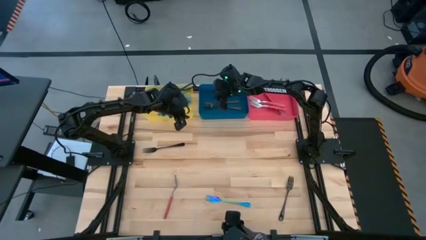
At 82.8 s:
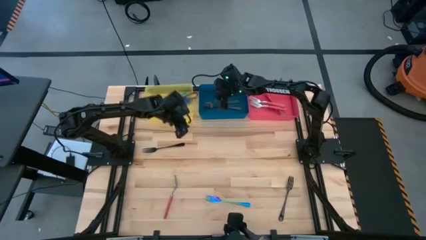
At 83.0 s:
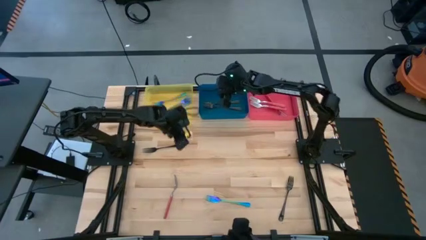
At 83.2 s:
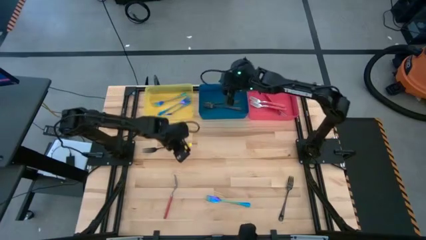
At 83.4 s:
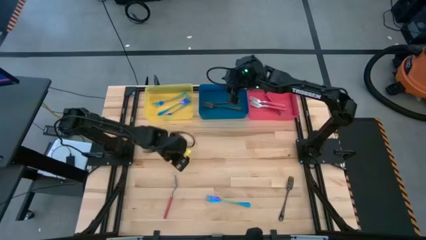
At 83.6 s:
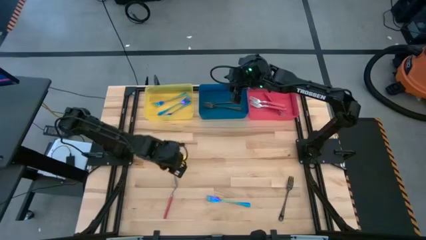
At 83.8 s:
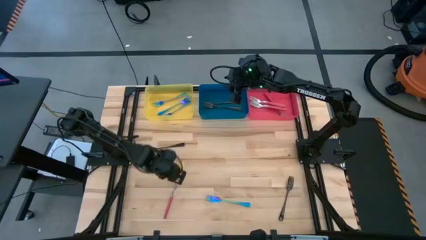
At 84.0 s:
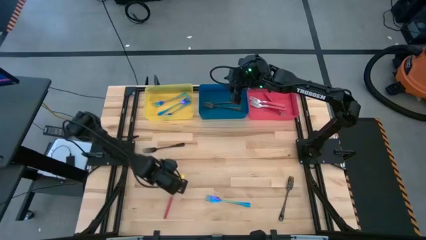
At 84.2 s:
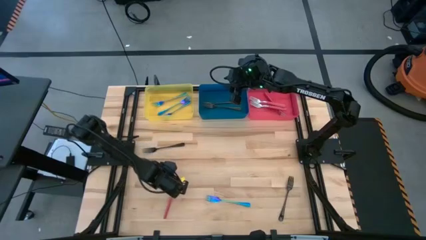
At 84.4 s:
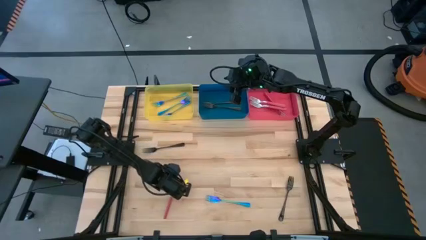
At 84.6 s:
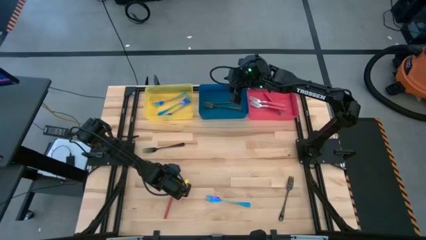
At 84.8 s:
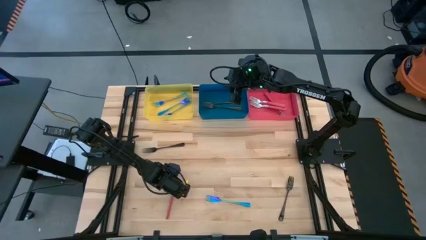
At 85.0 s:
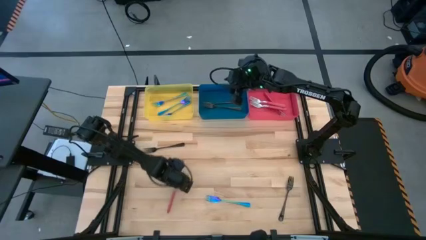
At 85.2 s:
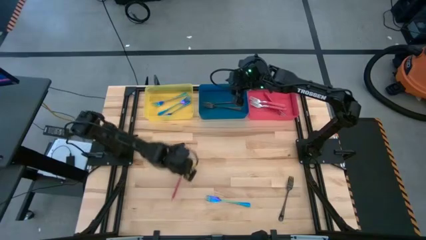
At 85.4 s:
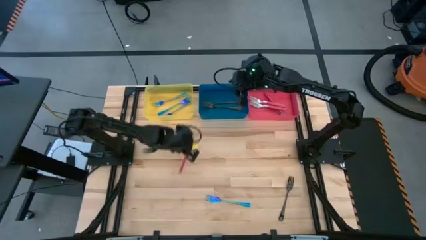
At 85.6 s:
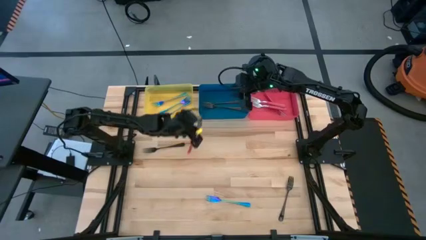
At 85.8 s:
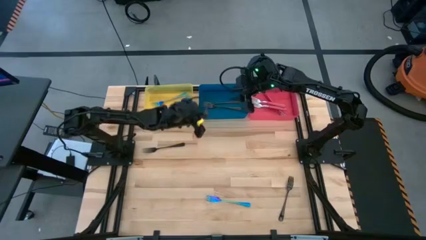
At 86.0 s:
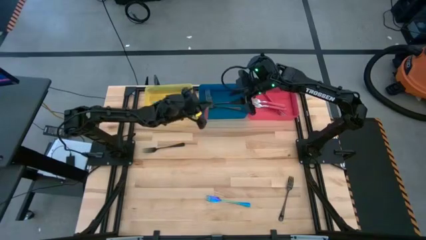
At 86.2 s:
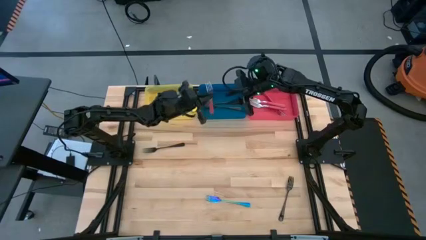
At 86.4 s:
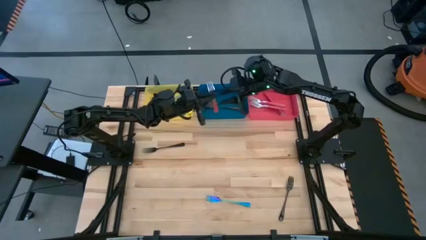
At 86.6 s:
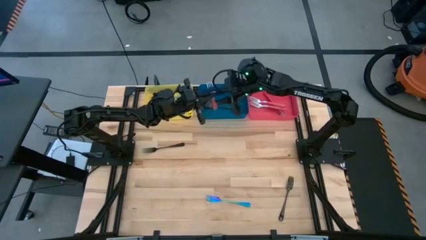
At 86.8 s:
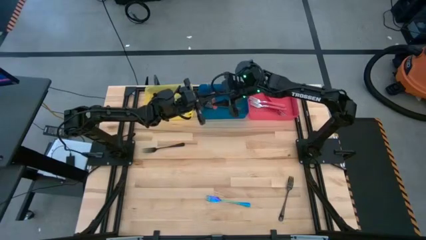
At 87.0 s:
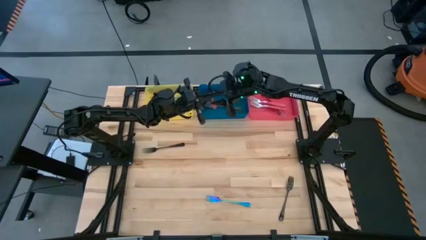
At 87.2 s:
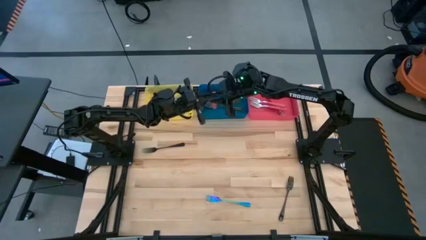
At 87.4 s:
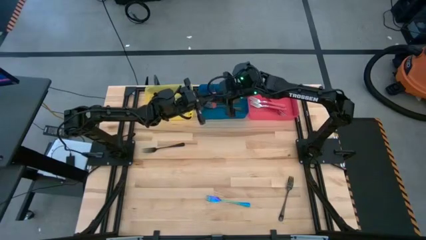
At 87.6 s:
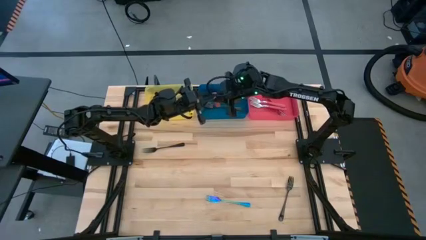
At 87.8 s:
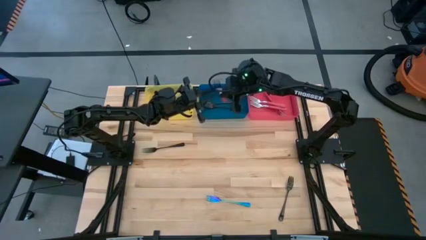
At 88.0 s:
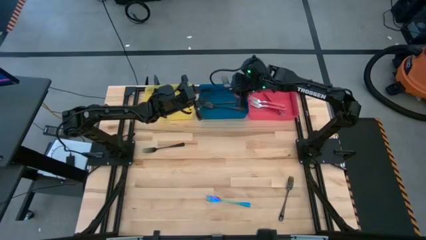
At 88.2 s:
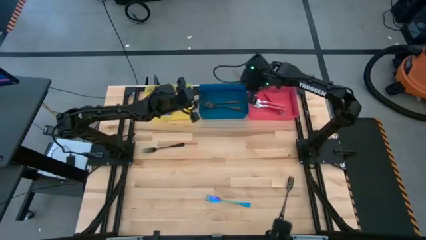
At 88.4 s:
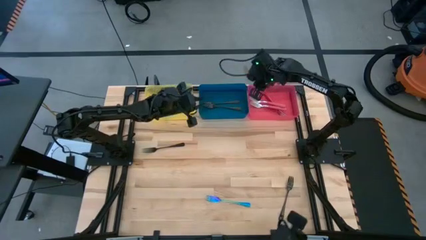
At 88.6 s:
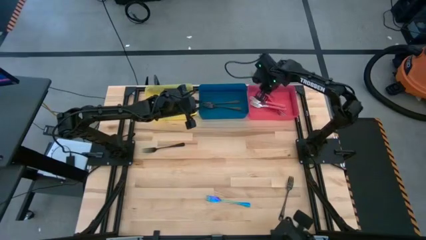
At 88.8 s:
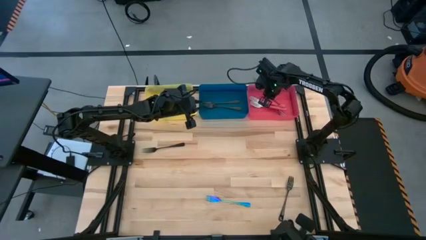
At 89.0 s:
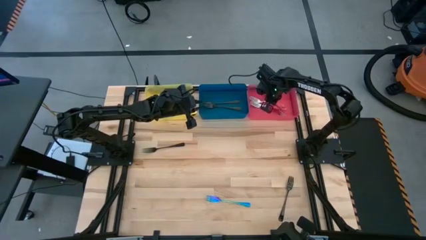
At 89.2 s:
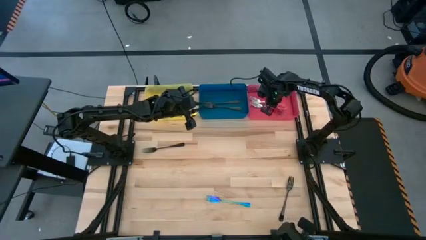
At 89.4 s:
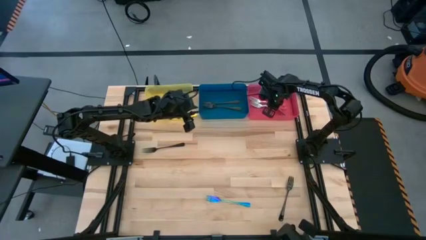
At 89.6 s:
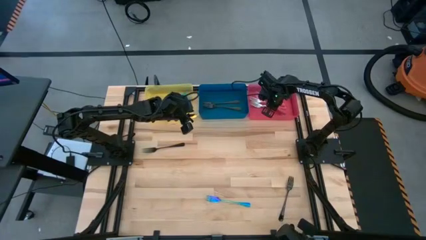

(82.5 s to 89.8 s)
Task: Sort silverware by color (type)
Put the pink fork into the pink bin

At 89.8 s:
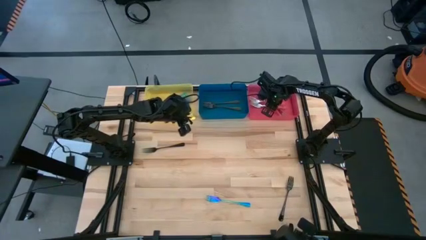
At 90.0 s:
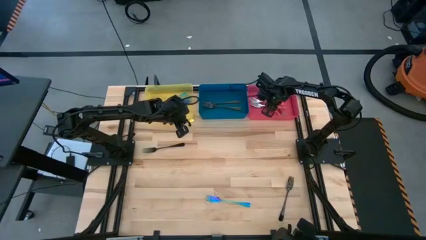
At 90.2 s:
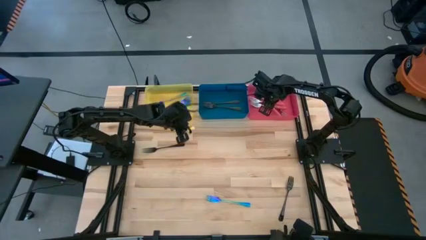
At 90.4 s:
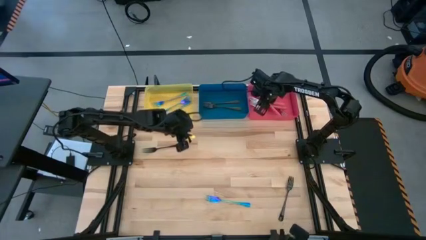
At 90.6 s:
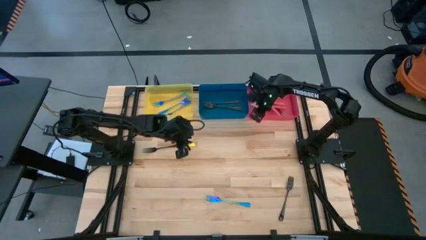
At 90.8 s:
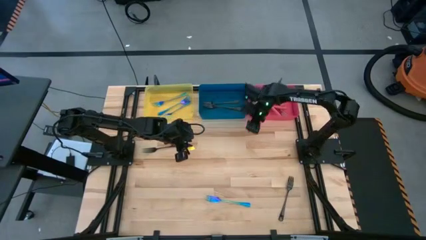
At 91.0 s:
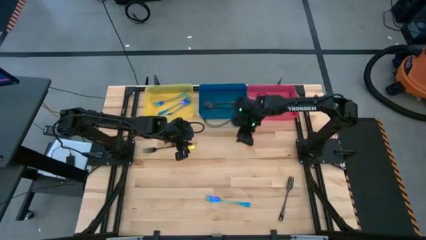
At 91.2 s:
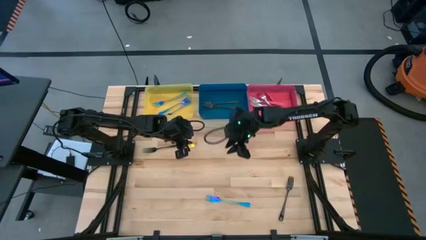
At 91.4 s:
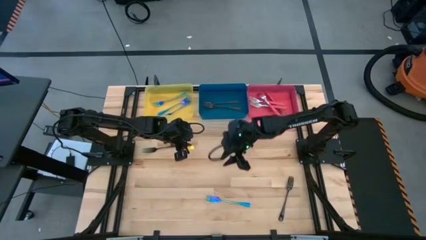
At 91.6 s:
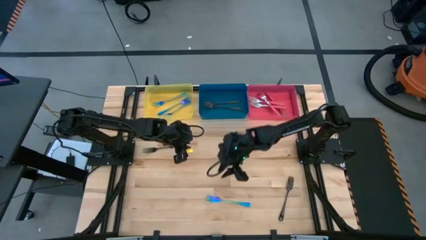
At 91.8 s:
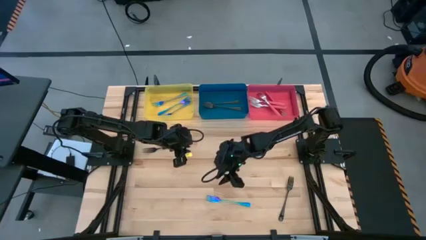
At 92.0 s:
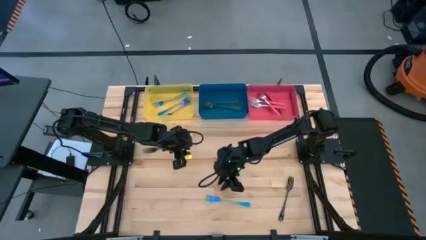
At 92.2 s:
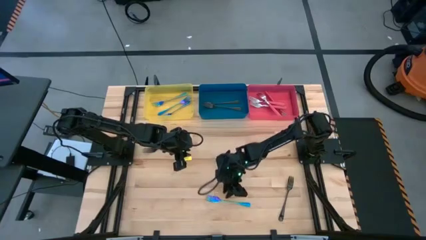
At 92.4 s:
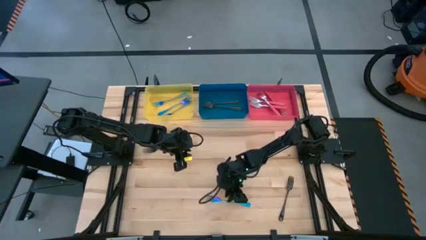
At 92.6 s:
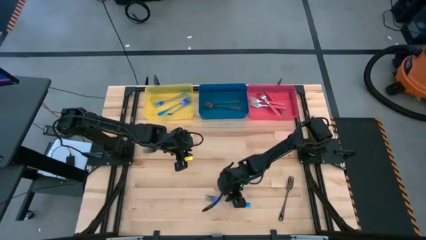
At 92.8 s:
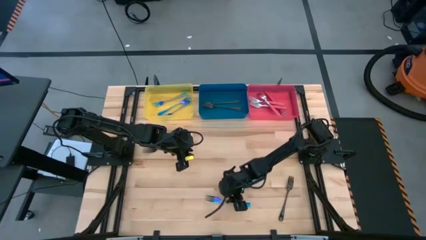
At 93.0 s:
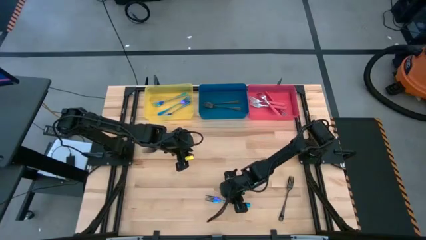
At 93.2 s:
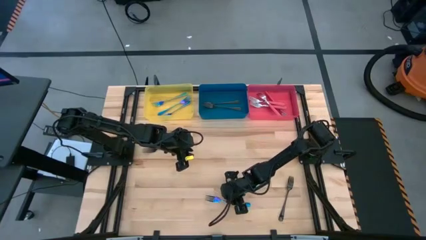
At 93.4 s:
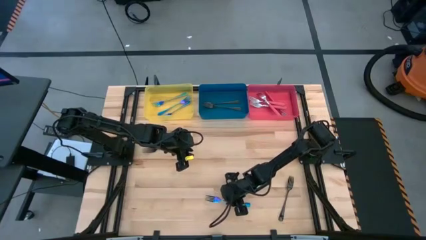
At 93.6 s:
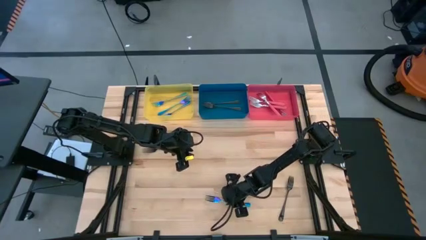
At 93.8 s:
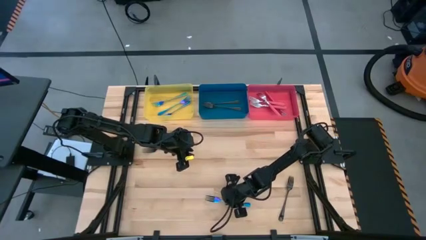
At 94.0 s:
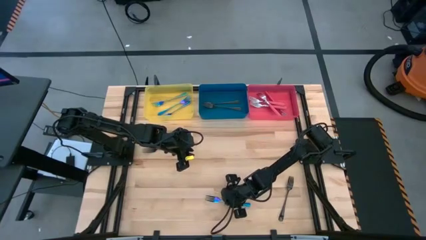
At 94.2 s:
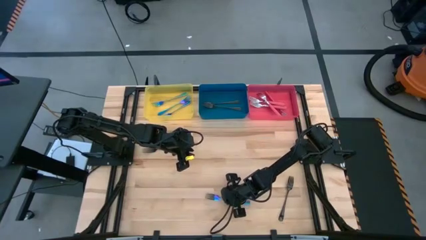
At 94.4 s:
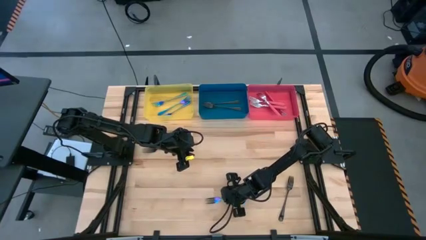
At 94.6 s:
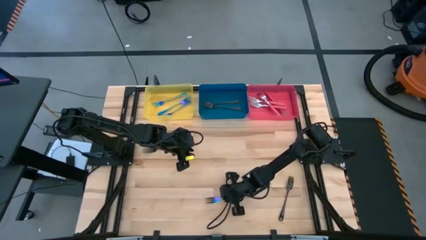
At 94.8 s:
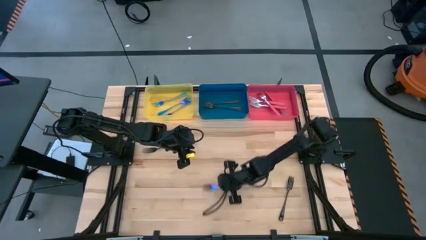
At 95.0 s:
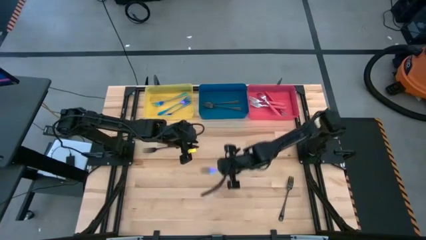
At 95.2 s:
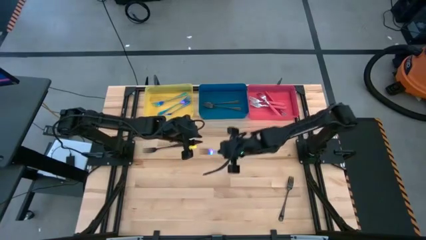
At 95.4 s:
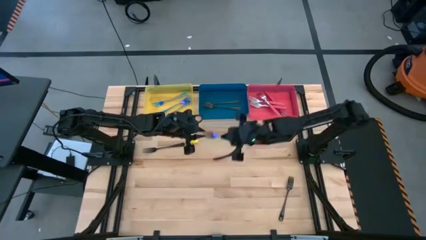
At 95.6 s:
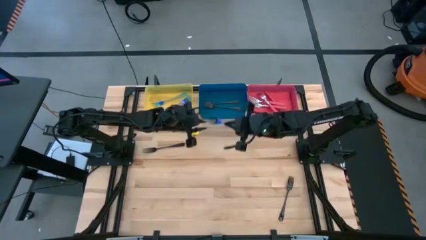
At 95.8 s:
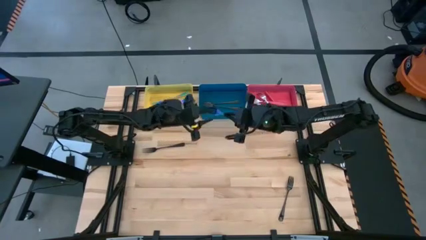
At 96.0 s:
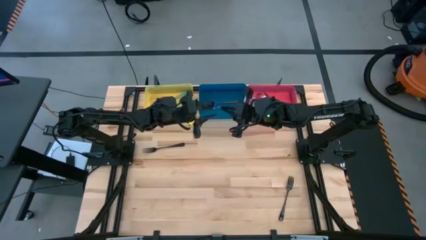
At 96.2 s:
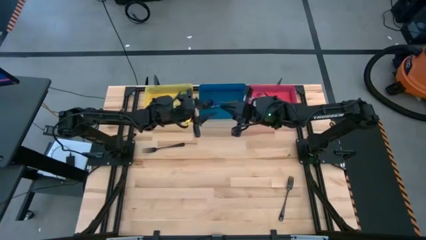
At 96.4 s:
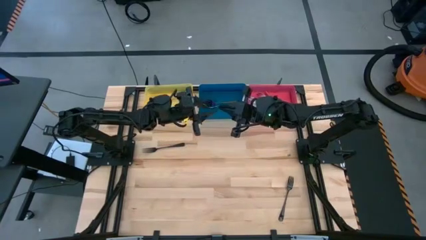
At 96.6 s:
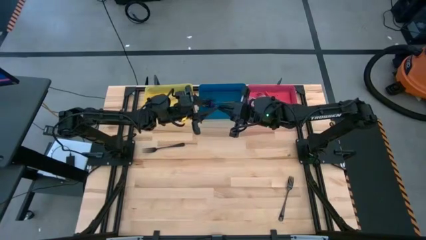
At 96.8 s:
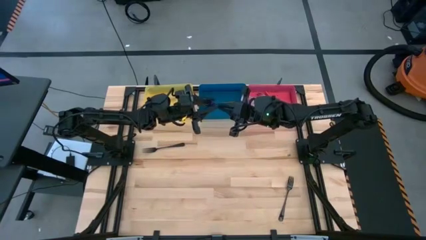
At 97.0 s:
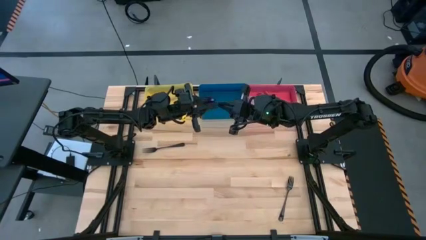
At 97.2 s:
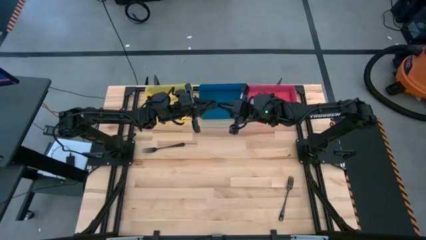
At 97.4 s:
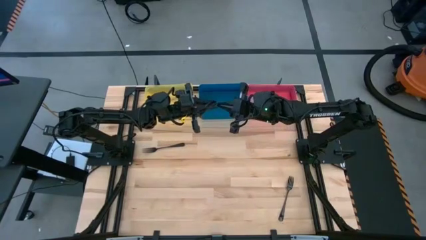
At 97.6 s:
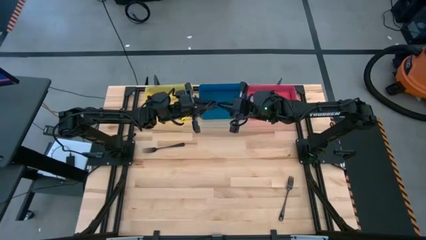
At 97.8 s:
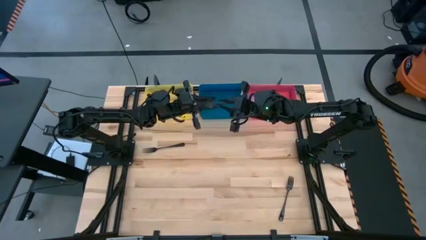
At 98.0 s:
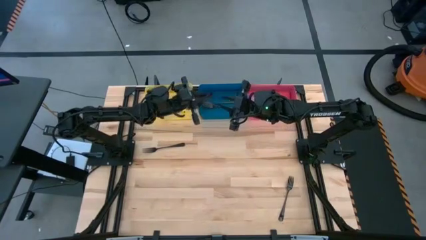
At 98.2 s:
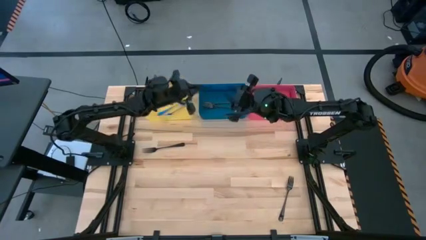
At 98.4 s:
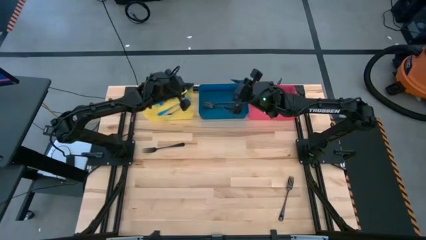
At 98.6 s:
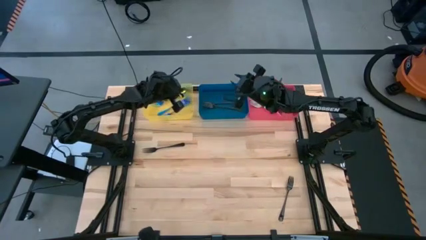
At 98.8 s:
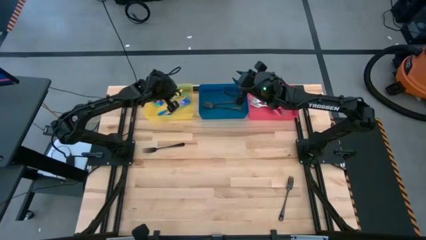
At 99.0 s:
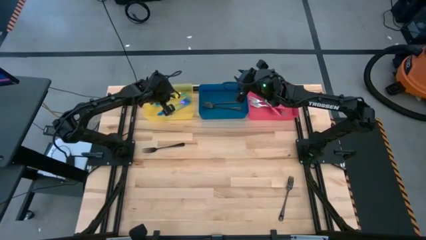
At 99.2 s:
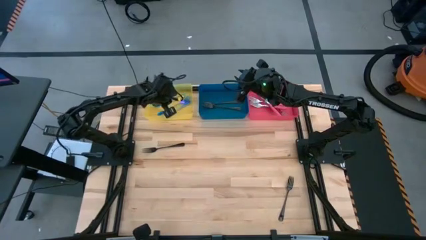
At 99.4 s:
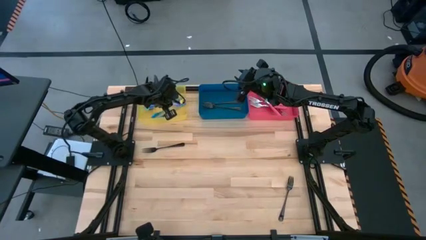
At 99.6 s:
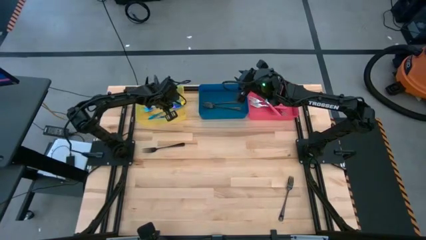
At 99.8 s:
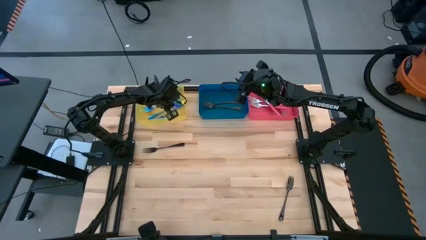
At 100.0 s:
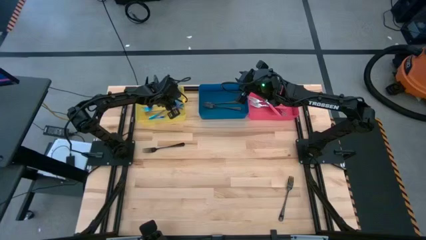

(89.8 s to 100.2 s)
Put the iridescent fork into the yellow bin
